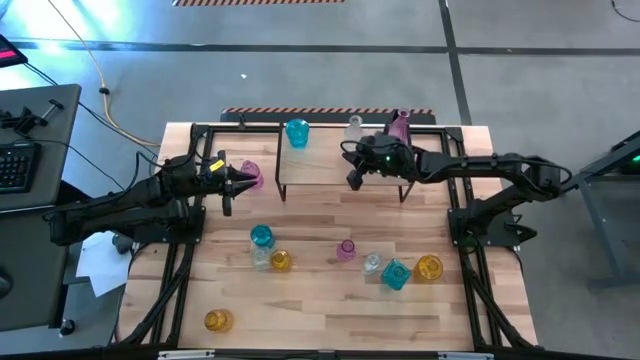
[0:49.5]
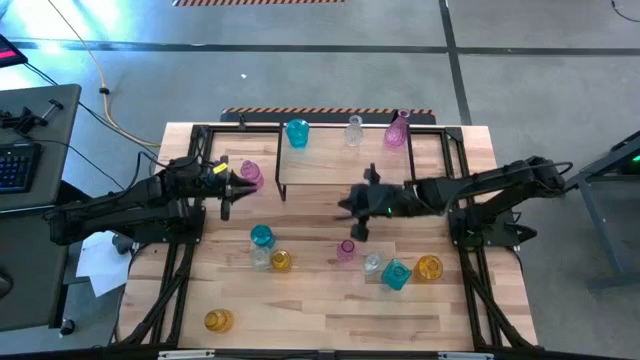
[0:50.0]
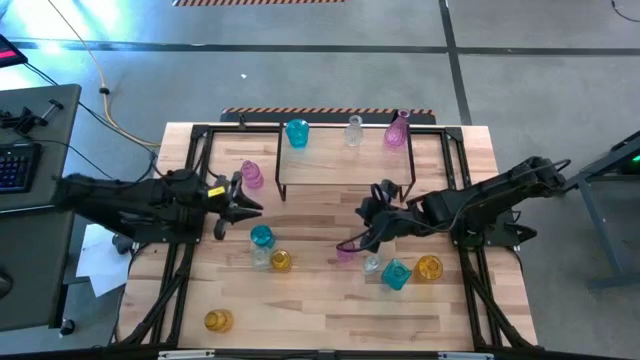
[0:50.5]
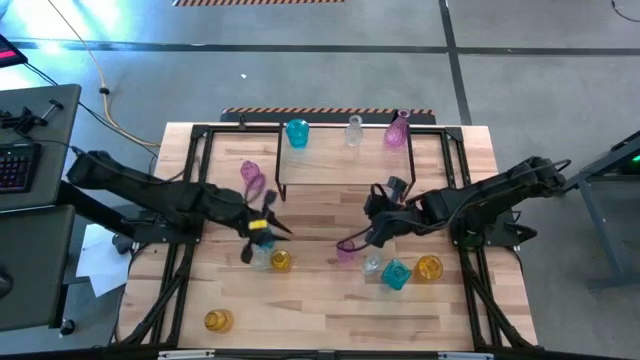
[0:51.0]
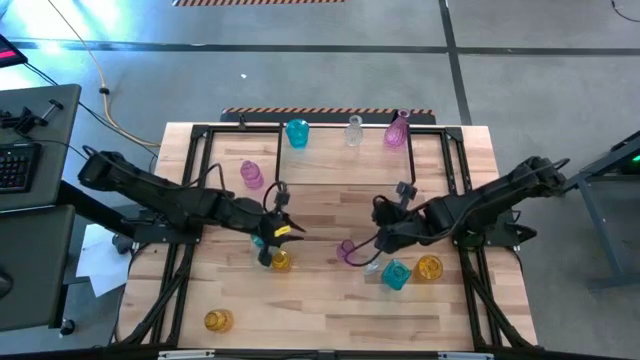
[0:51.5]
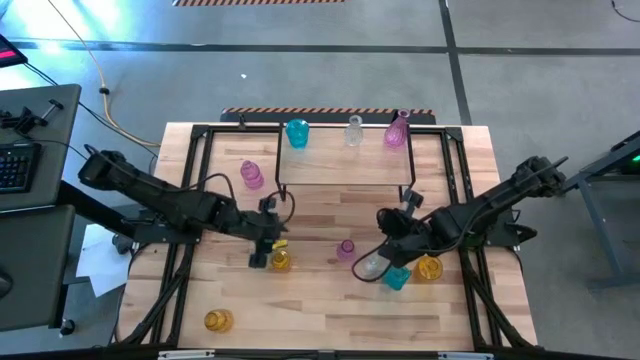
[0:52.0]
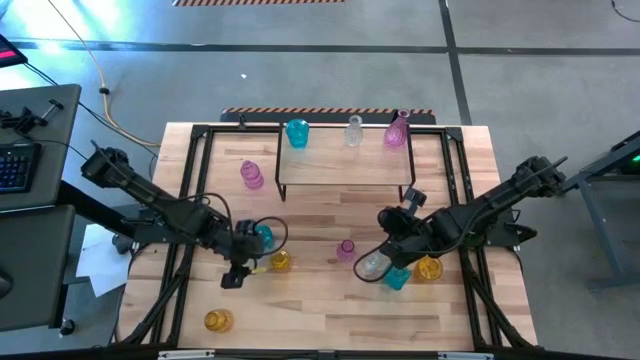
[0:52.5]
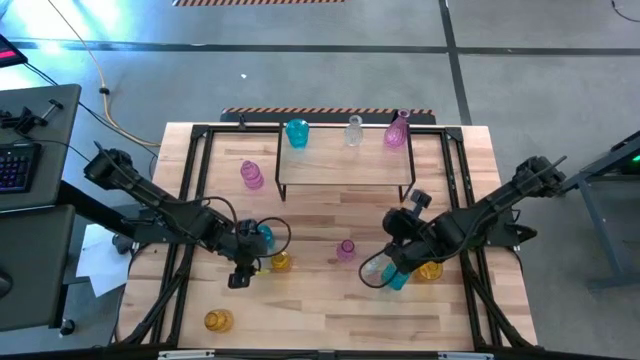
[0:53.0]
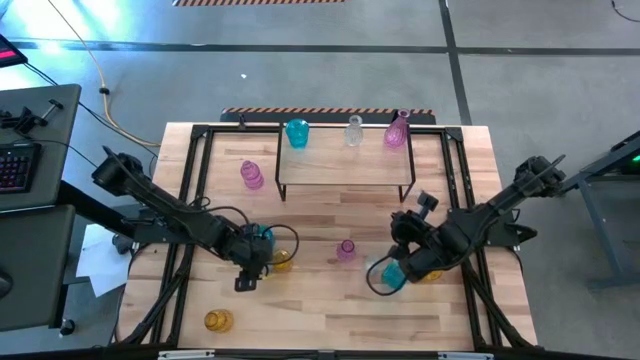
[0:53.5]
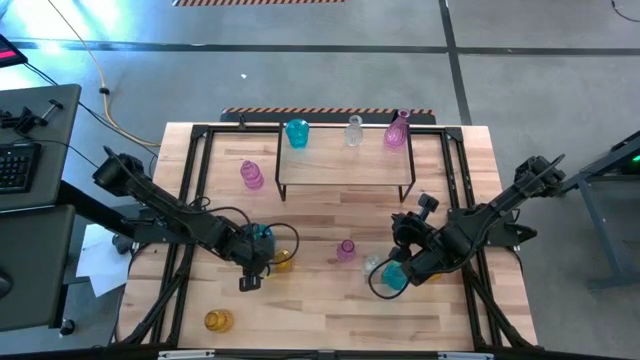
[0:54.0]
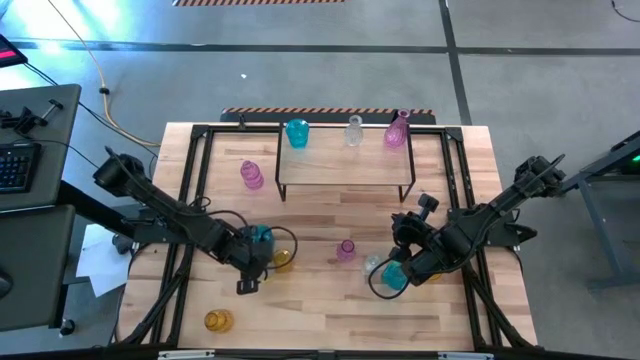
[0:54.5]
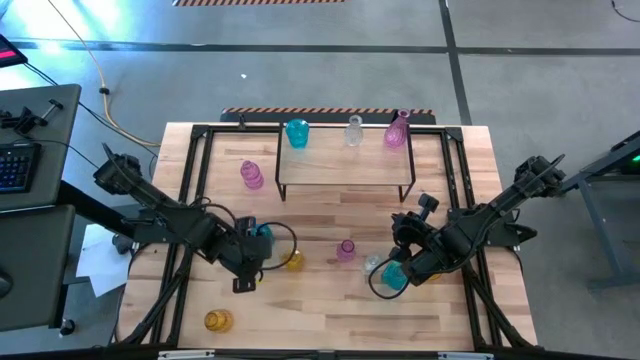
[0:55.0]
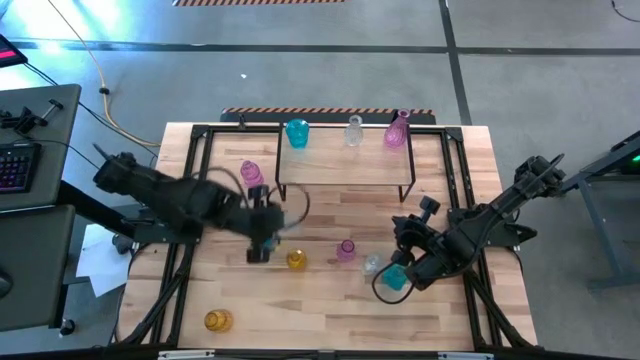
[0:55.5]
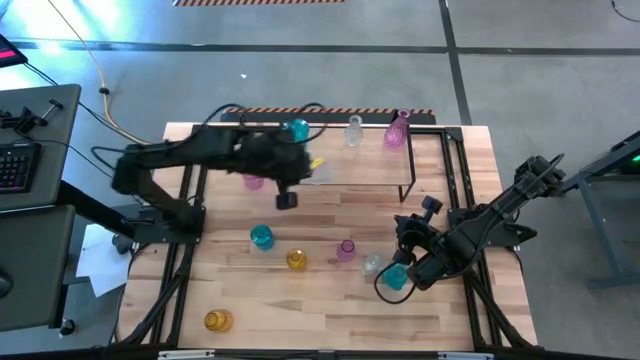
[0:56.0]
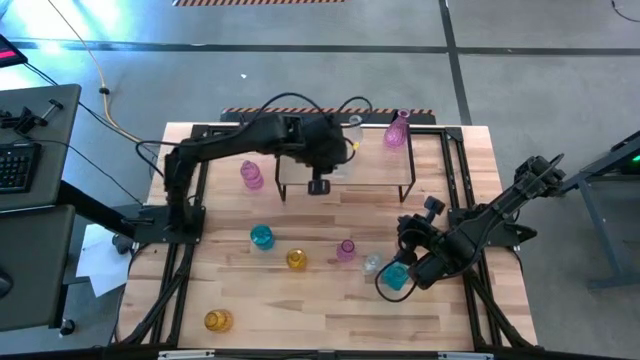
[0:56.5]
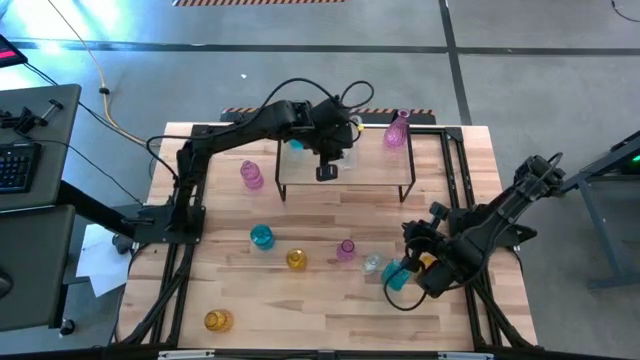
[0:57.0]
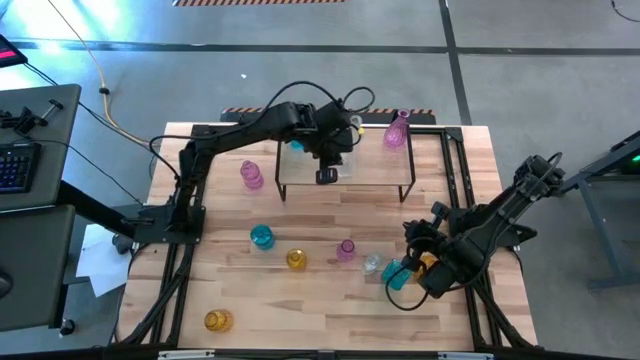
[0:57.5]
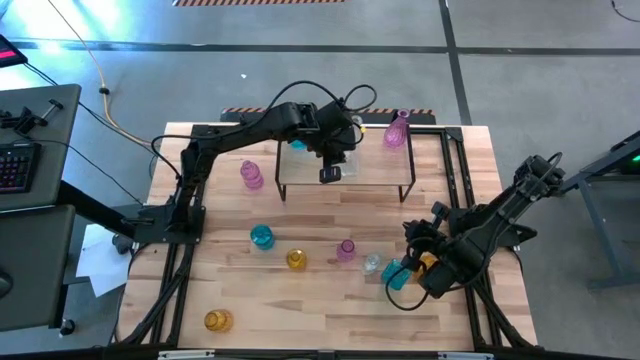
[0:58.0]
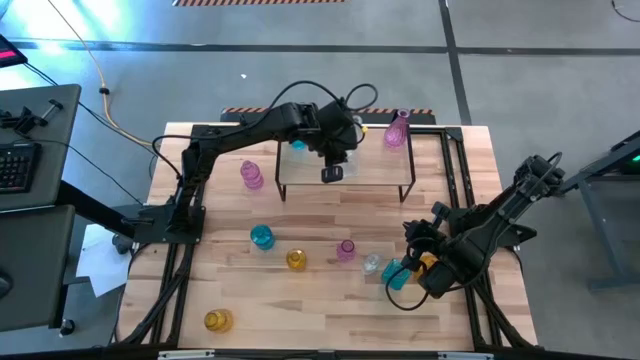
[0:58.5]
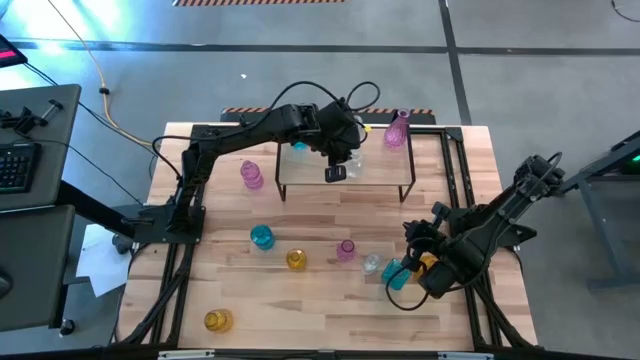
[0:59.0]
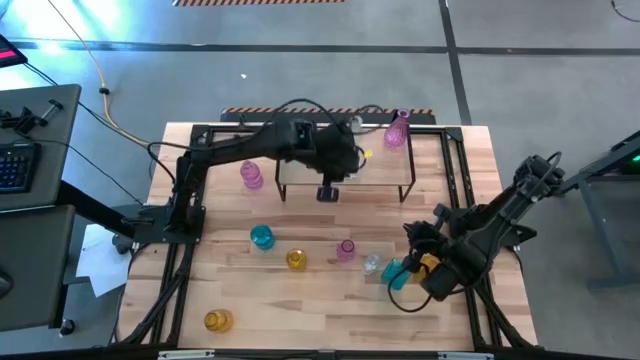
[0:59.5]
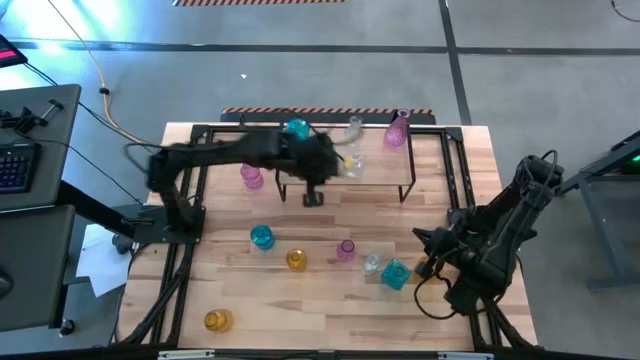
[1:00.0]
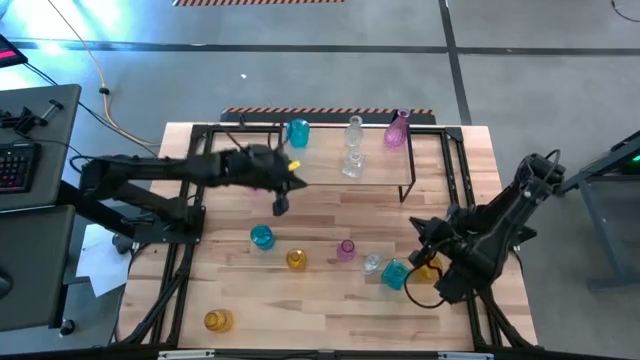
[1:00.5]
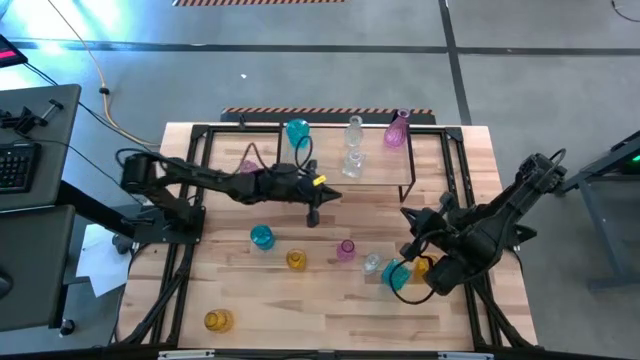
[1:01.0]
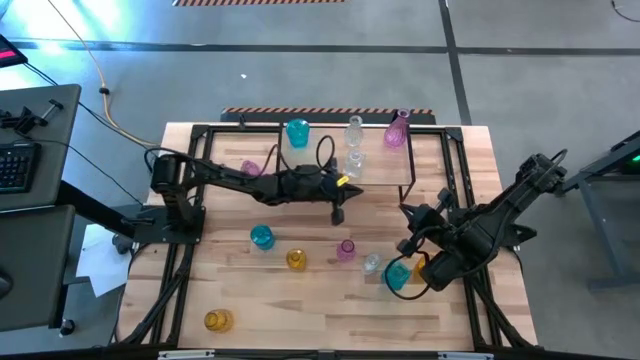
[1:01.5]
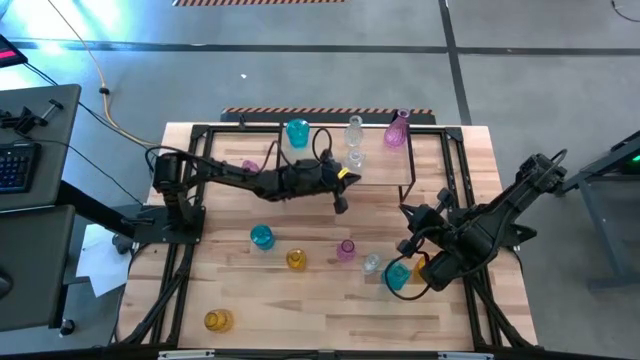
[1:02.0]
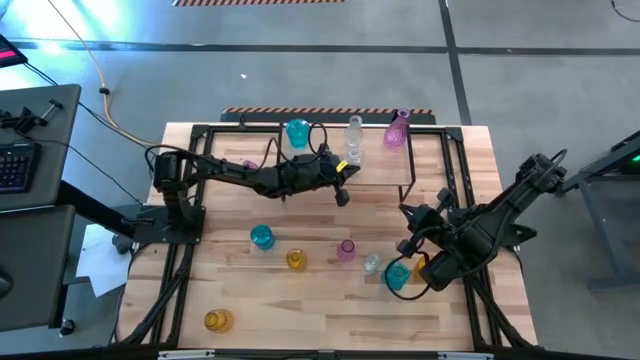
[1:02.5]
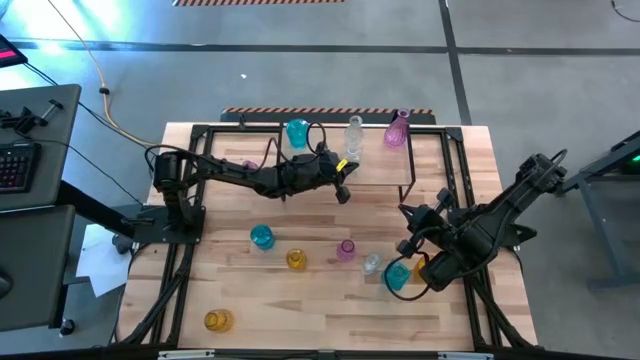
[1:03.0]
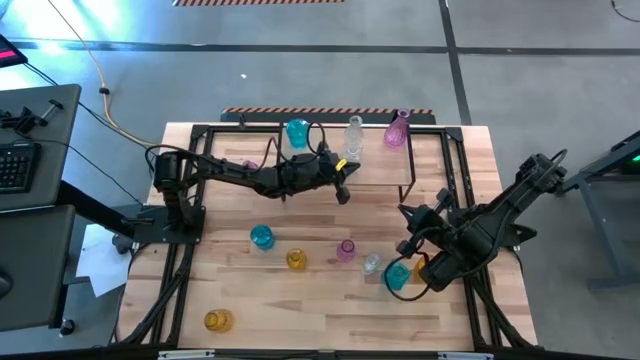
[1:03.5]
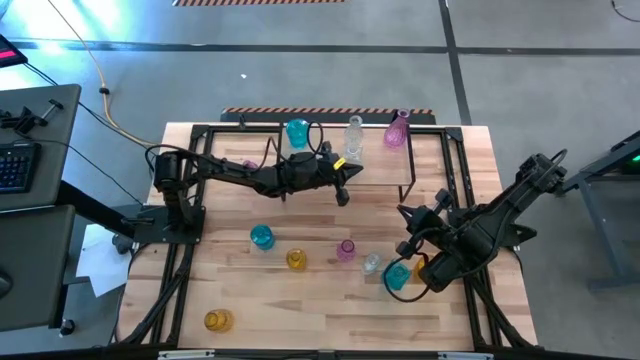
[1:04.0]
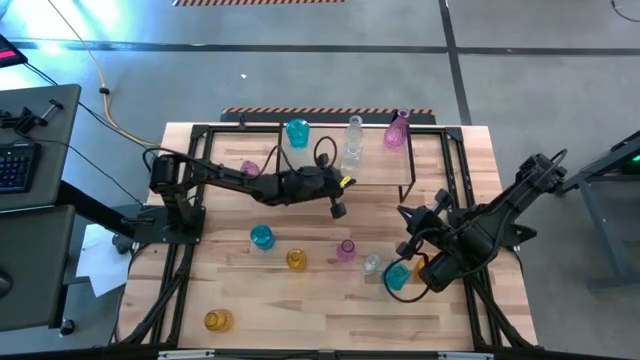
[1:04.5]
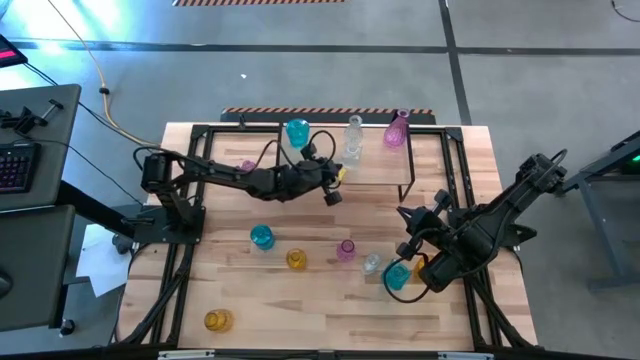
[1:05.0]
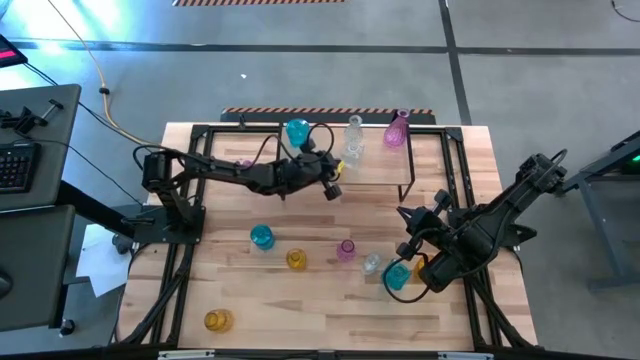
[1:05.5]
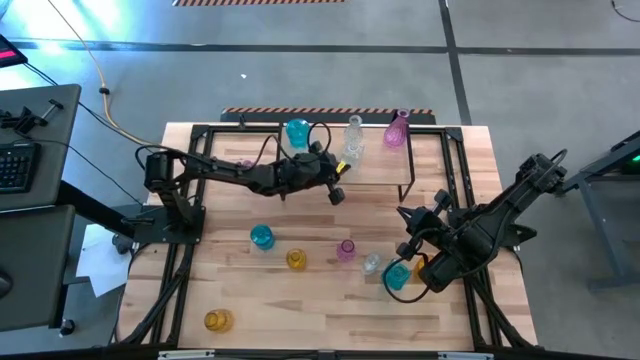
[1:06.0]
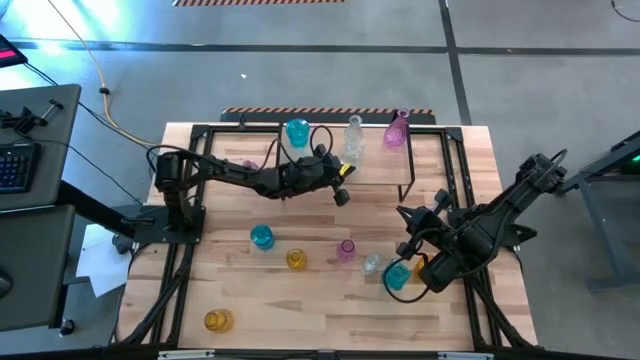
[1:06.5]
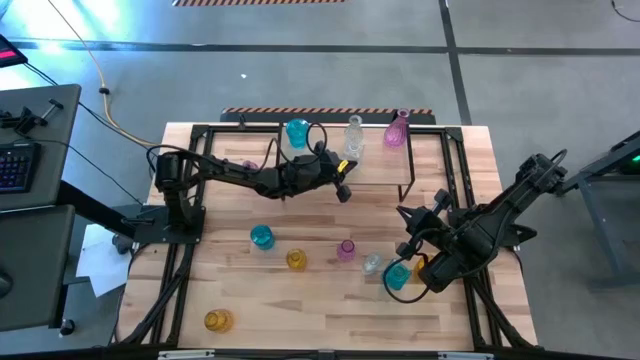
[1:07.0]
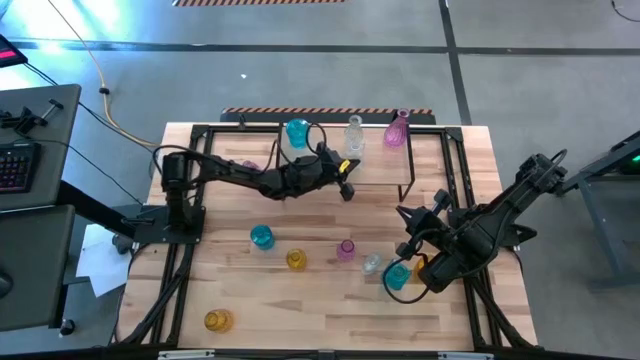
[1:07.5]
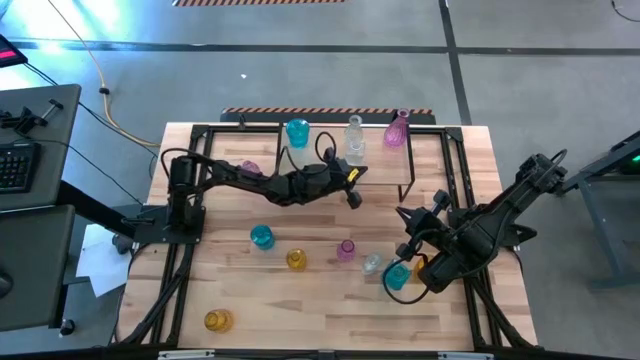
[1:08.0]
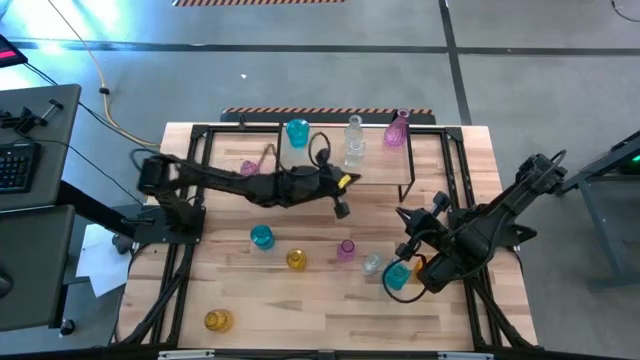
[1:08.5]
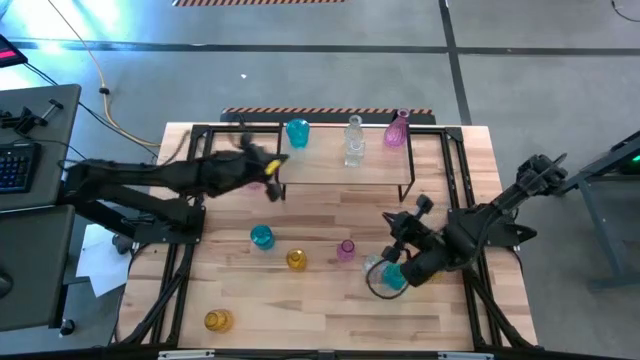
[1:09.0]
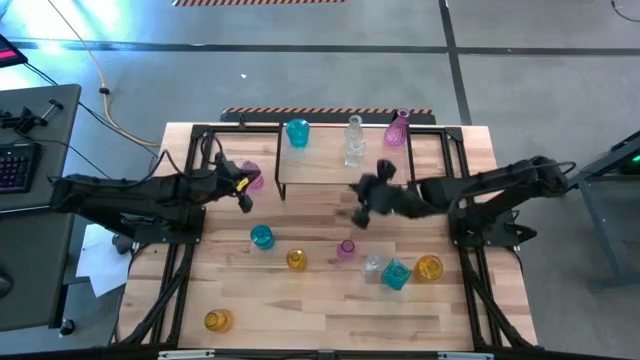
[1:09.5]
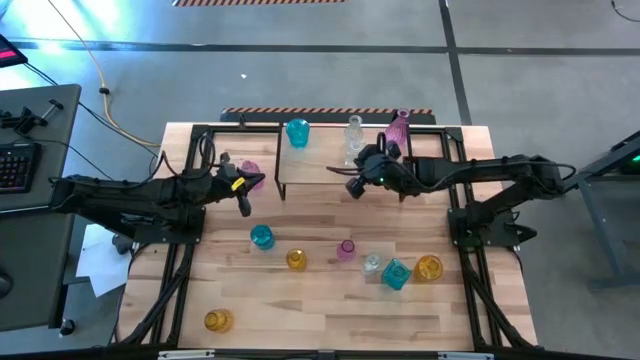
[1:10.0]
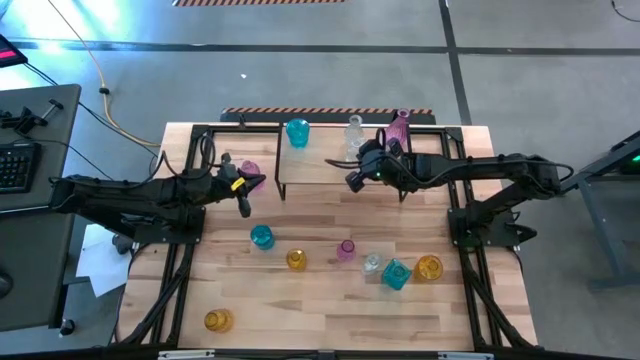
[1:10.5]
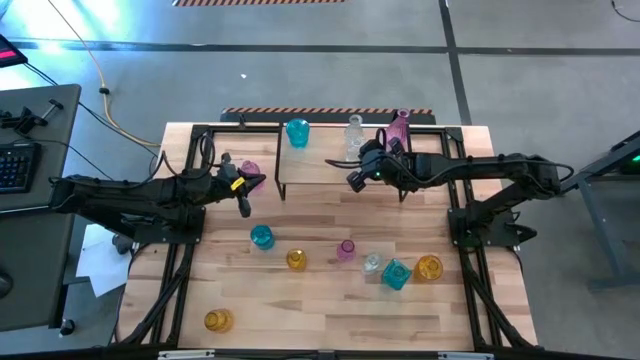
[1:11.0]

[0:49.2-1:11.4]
Task: sort vases onto shelf
Put the left transparent vase on the shelf aligned with the other transparent vase
